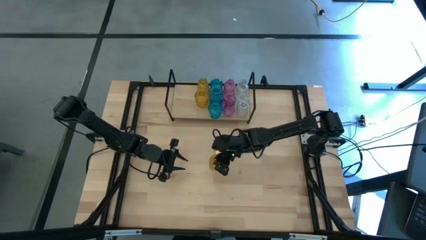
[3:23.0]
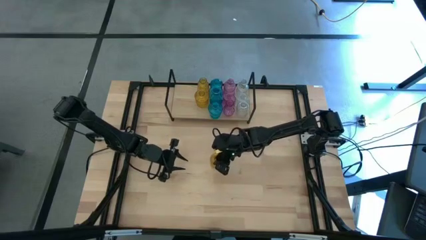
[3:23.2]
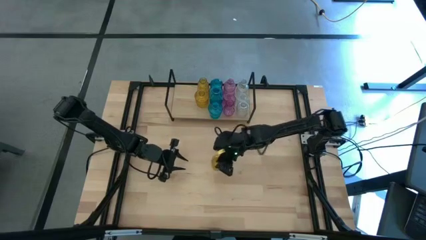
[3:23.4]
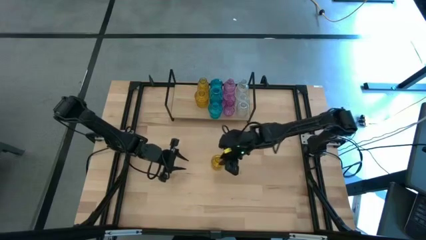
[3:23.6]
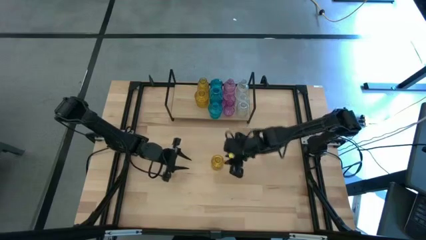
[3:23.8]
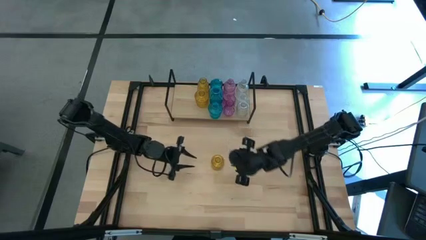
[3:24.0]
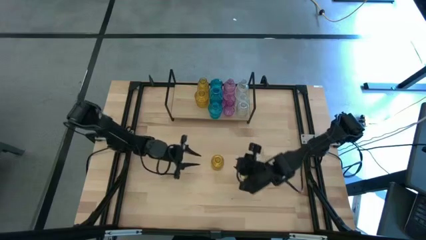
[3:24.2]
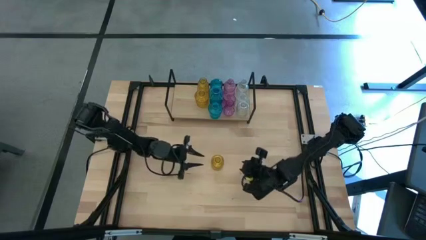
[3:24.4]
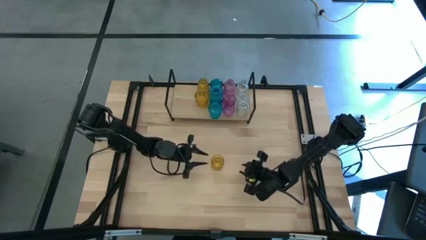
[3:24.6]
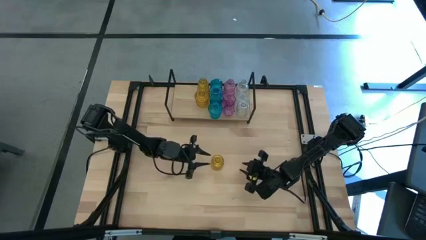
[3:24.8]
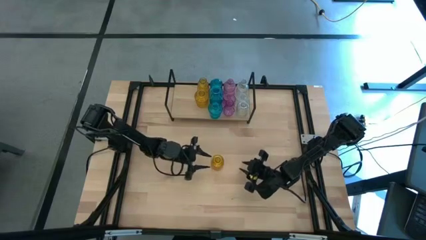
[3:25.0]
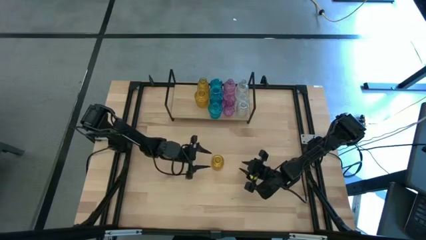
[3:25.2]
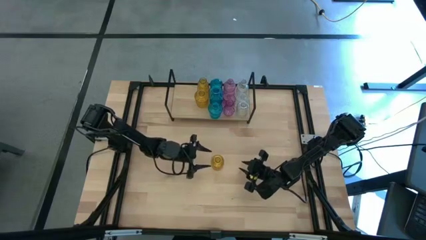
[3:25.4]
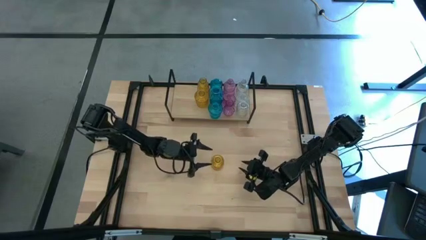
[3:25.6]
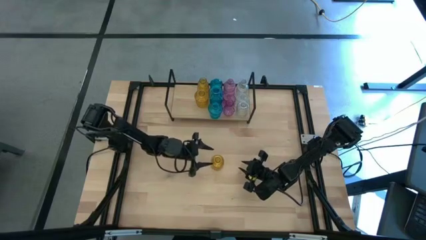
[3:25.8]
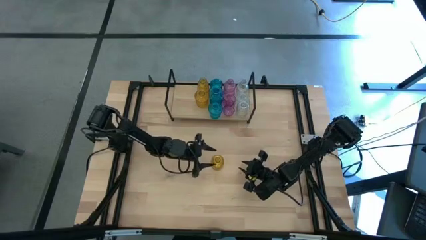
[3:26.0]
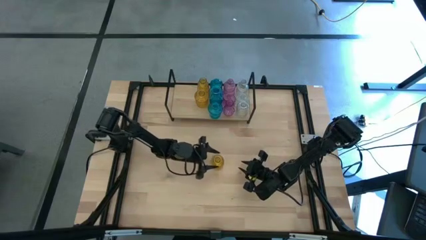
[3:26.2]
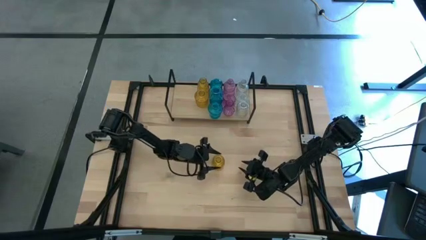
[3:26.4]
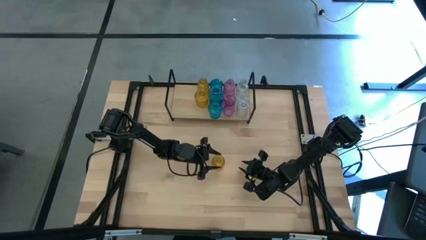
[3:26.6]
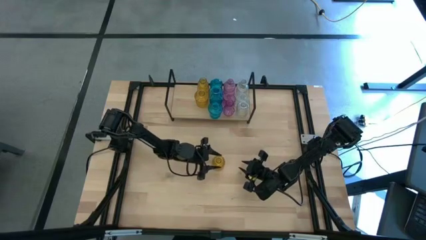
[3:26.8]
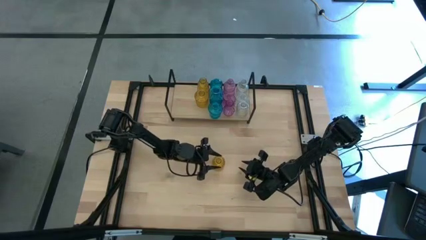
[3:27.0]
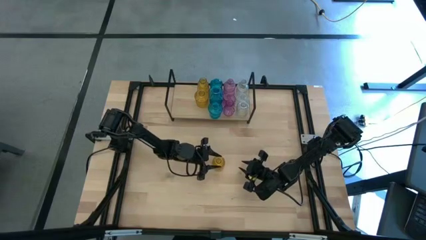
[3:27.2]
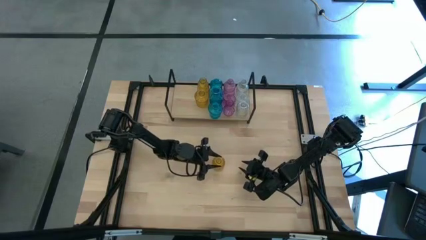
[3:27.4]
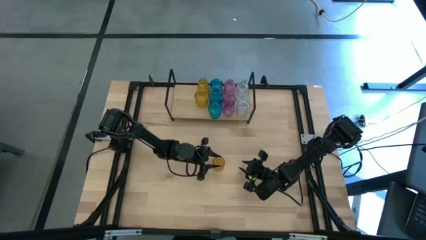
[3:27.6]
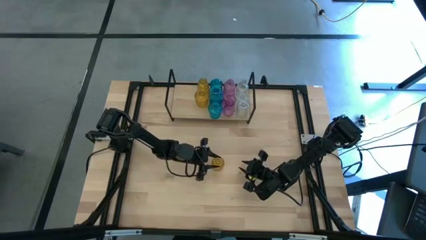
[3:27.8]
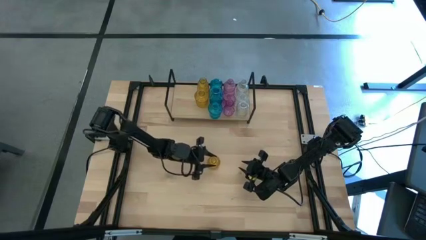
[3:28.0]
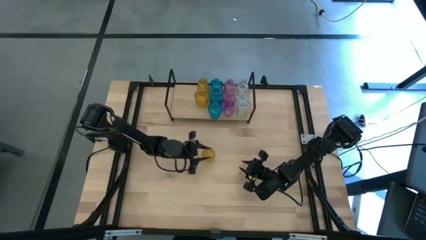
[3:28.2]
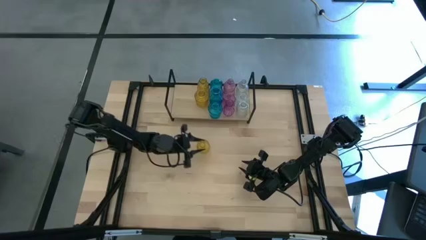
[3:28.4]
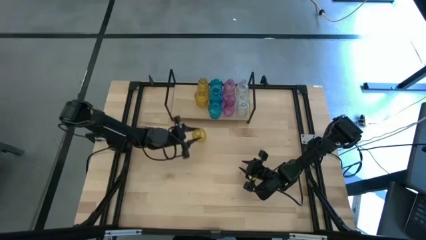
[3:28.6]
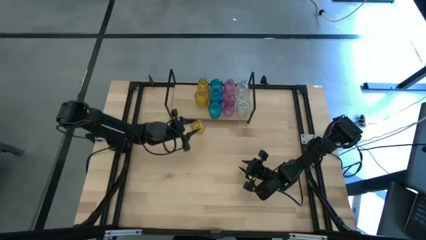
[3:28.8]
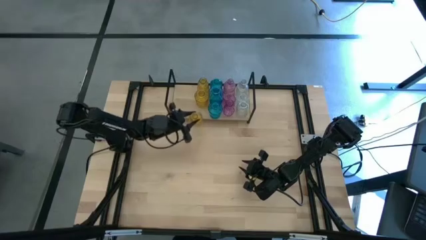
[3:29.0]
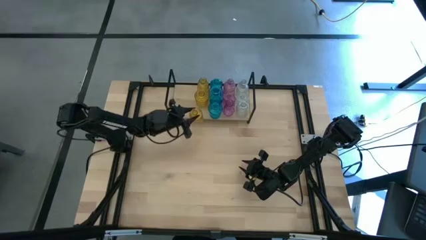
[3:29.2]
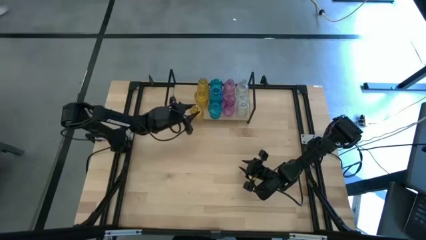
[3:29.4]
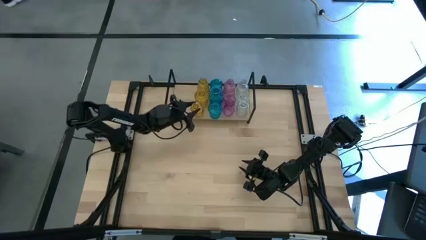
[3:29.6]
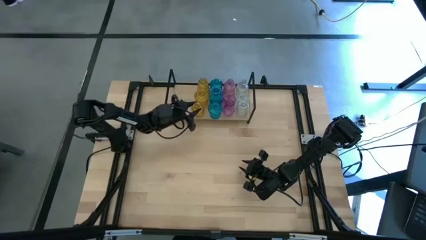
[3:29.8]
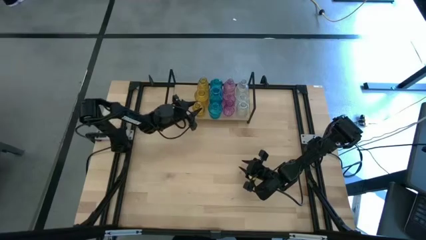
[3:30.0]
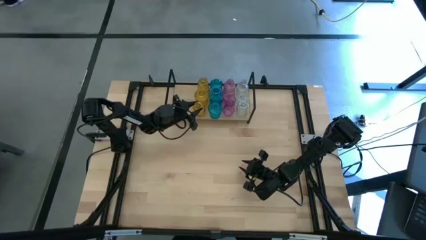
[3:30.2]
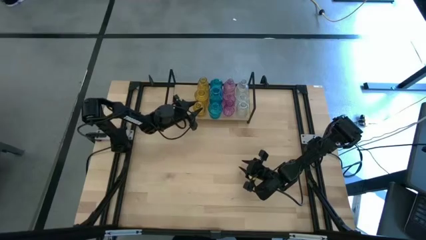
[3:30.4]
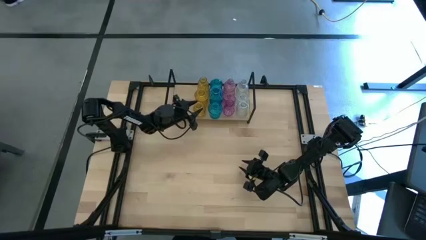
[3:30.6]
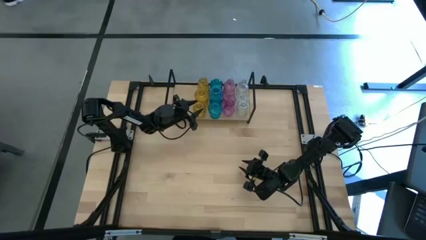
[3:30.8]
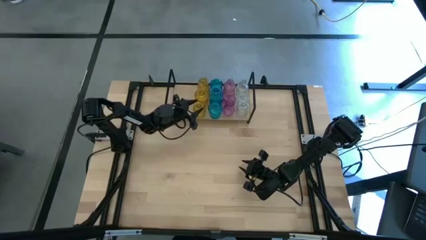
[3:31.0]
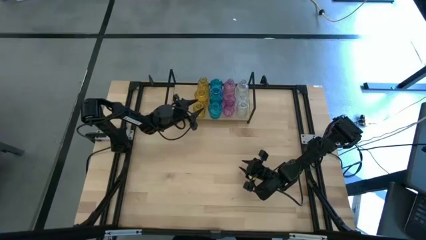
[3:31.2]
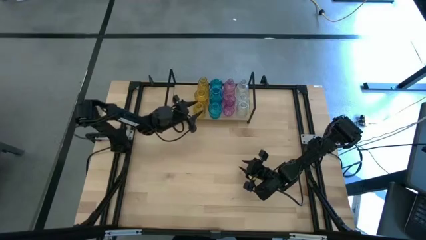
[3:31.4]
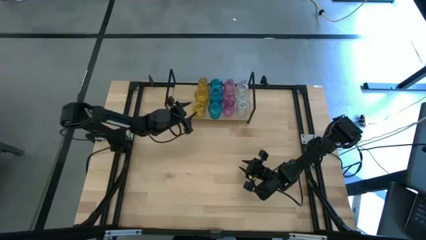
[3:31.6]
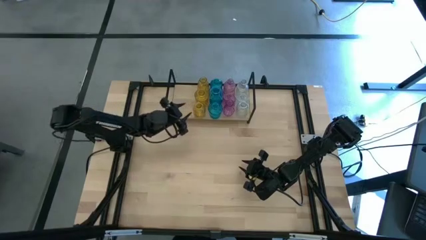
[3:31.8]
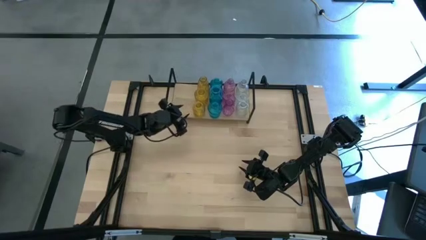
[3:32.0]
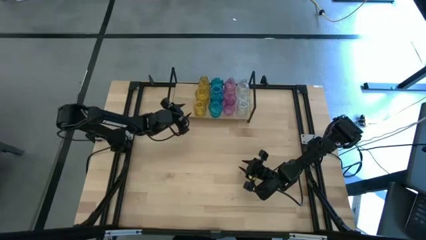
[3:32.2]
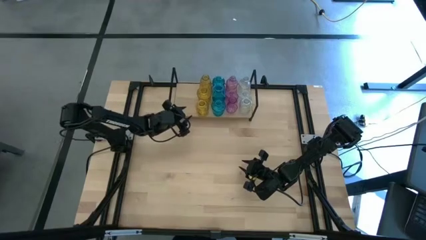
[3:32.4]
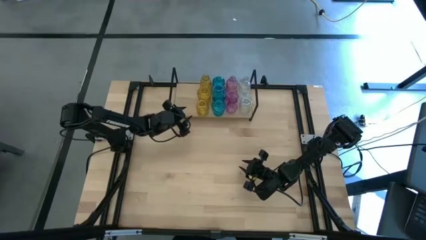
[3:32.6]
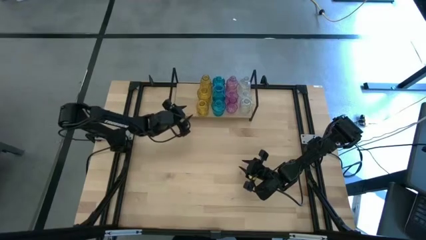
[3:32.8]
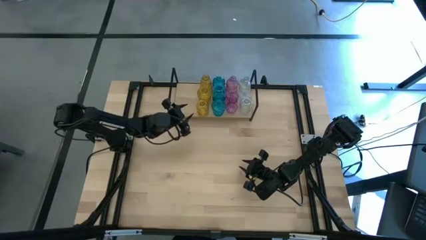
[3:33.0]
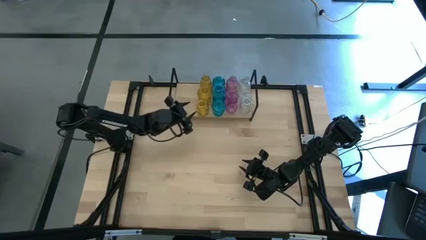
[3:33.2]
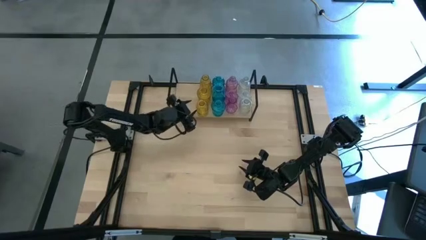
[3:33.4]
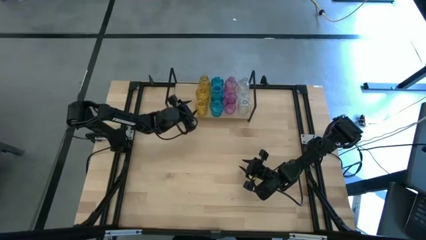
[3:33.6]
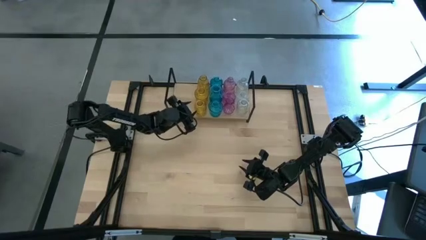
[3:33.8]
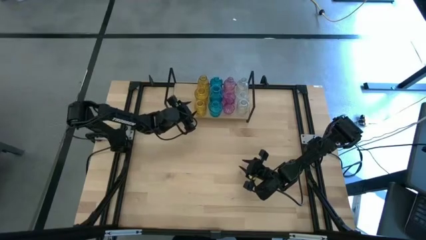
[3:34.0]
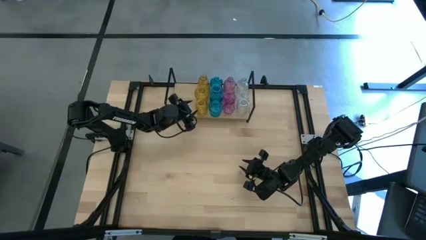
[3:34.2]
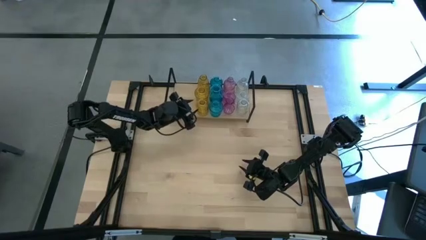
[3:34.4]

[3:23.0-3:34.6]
Task: sort vases onto shelf
Put the yellow vase on the shelf aligned with the other yellow vases

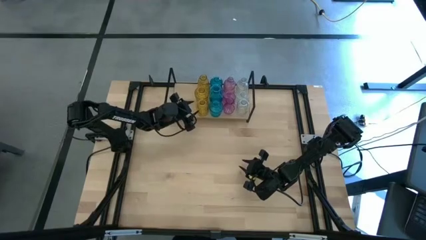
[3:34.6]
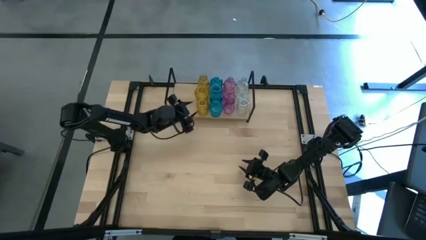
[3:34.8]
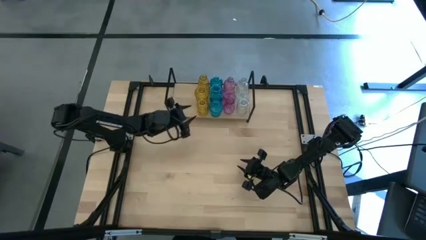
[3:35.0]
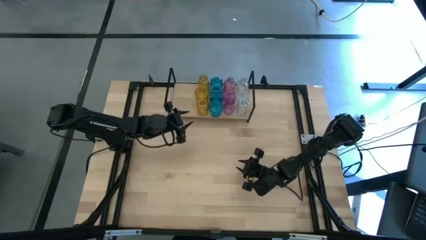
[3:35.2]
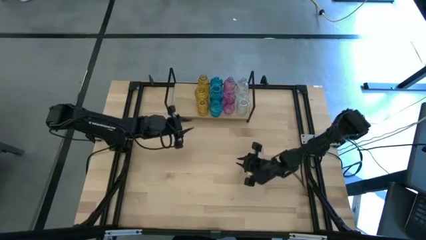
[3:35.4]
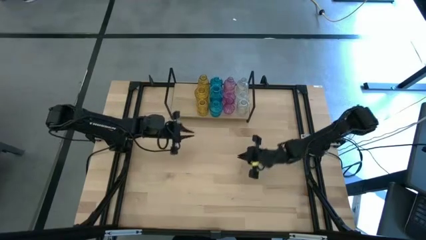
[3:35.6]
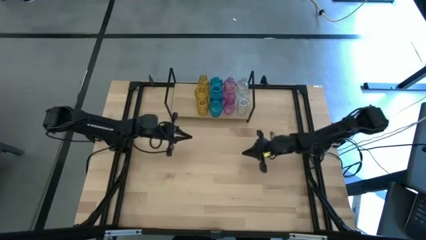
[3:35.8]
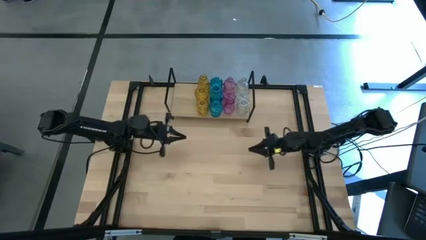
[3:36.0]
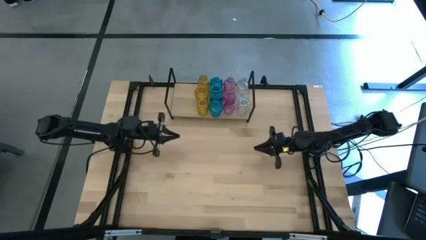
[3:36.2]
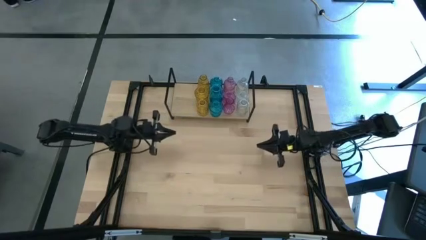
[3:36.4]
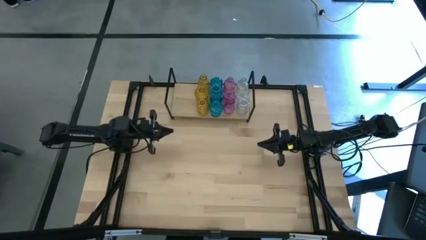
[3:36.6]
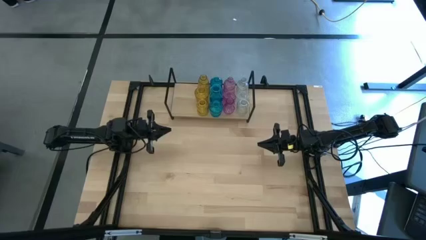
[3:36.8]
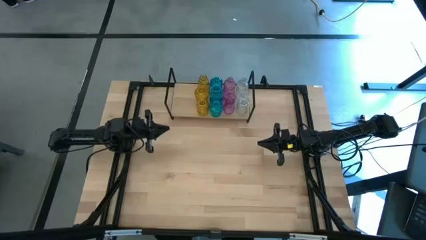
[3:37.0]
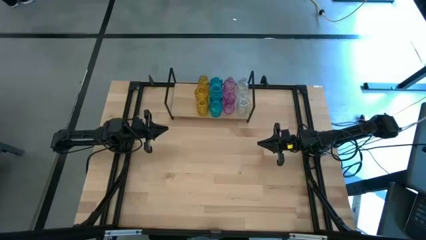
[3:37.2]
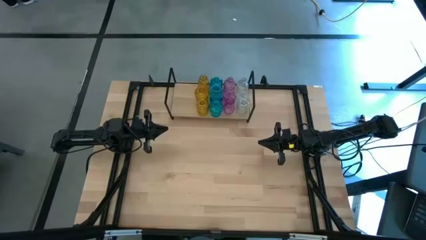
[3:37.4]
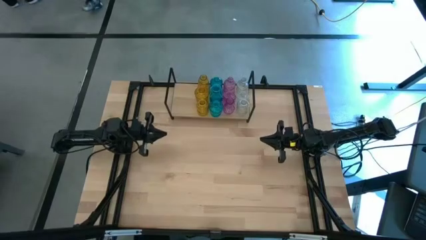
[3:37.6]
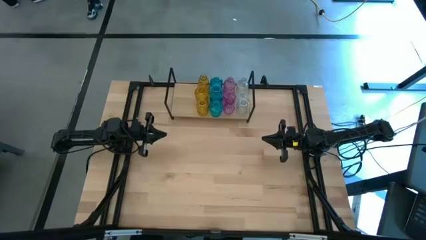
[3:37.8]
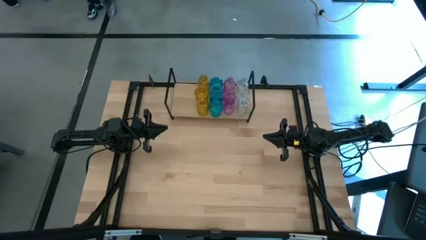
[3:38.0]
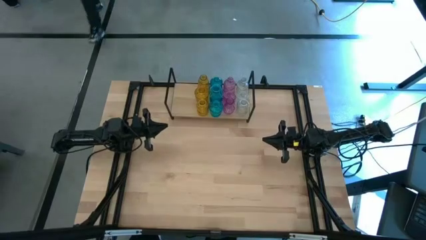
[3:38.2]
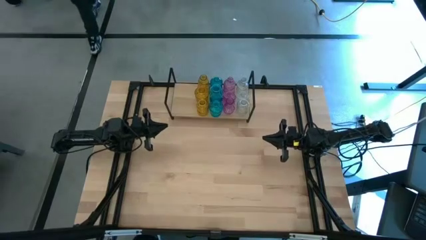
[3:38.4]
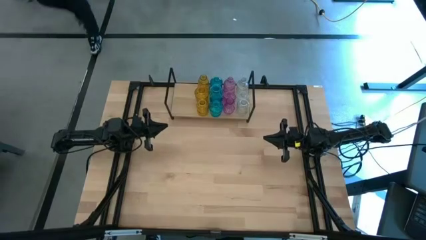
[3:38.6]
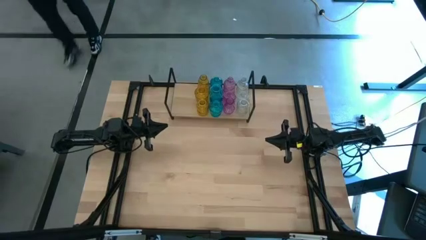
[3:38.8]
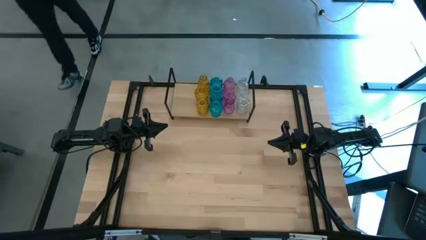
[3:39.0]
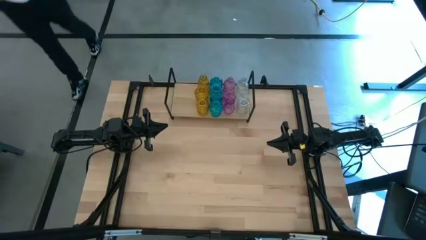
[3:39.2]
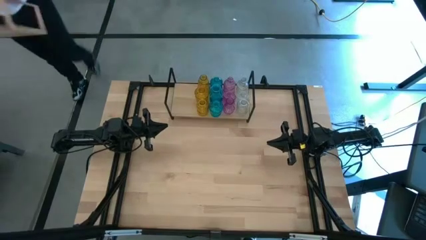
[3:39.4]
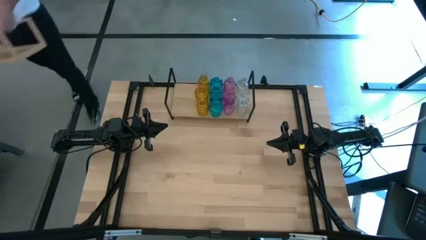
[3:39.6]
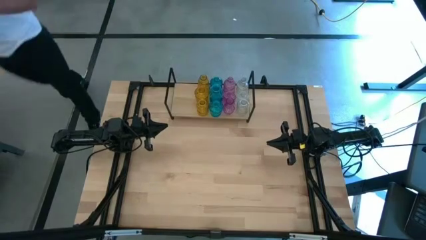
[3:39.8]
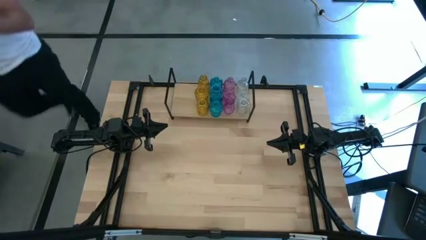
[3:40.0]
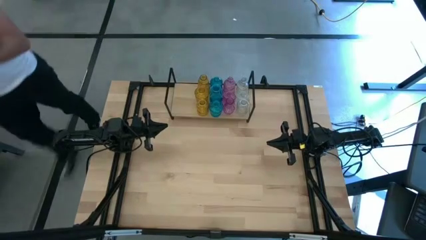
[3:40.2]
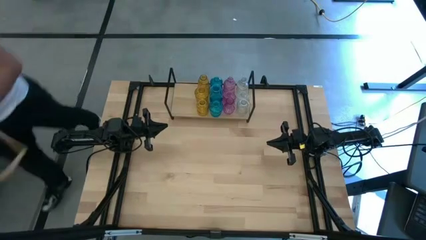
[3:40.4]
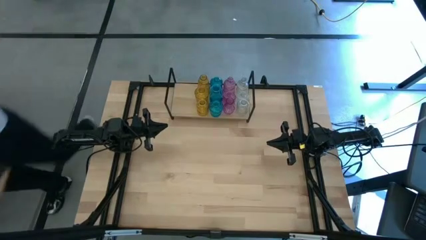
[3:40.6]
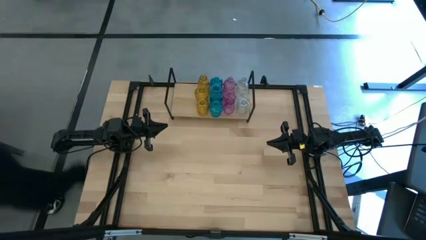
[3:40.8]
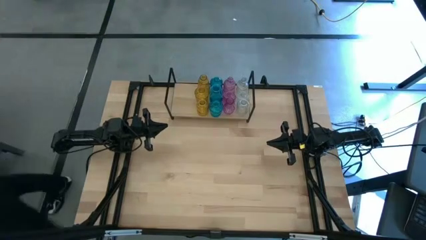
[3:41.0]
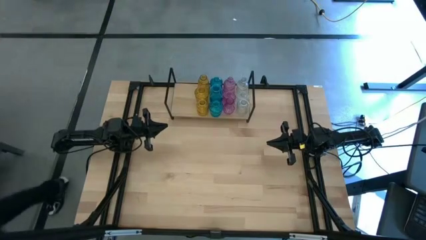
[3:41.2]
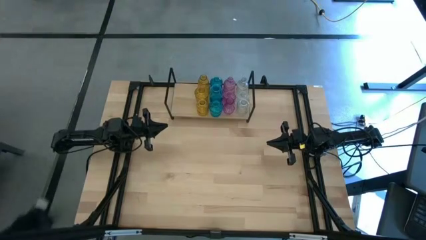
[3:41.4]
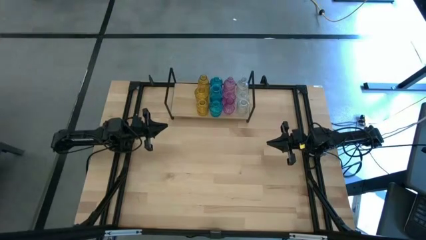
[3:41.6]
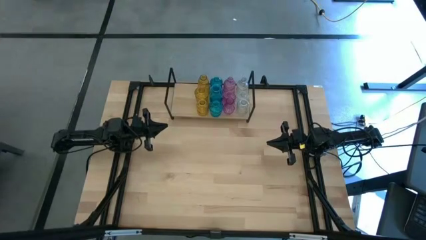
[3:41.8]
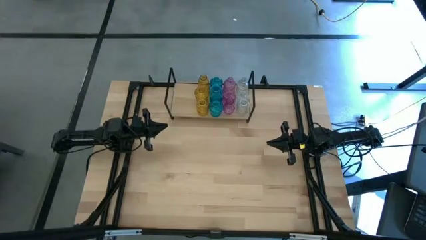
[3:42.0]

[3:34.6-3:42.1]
Return to Home Position
